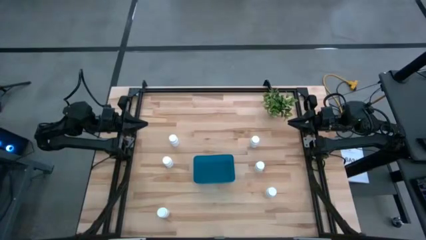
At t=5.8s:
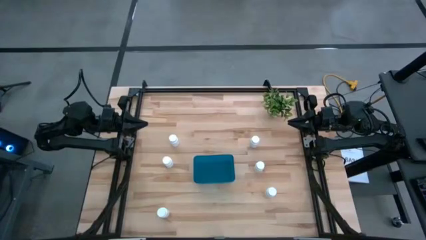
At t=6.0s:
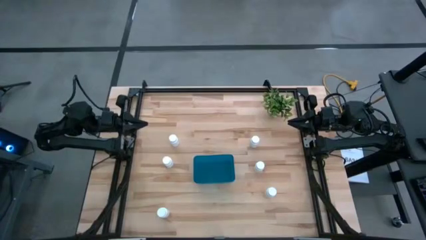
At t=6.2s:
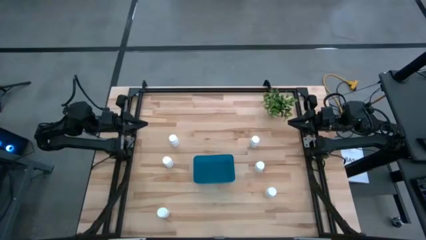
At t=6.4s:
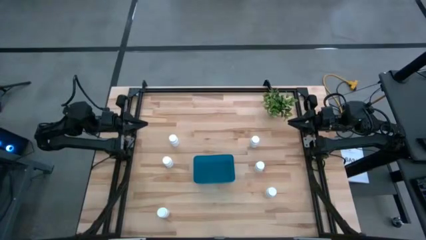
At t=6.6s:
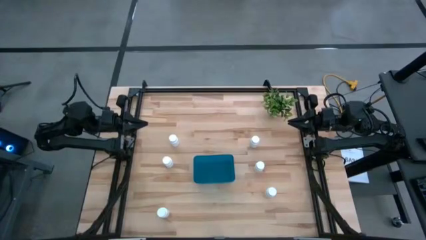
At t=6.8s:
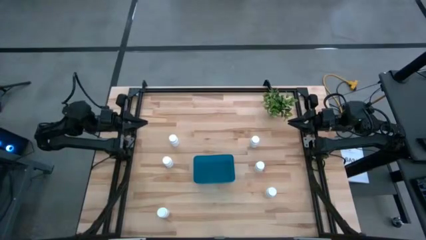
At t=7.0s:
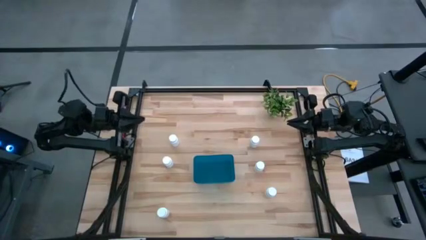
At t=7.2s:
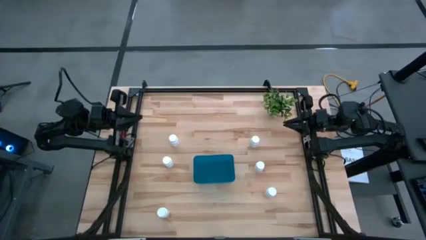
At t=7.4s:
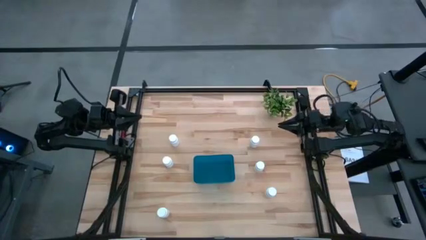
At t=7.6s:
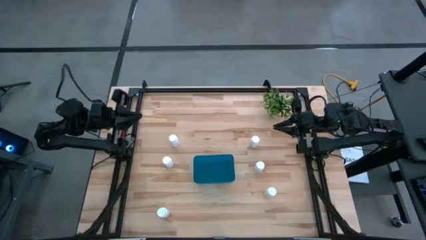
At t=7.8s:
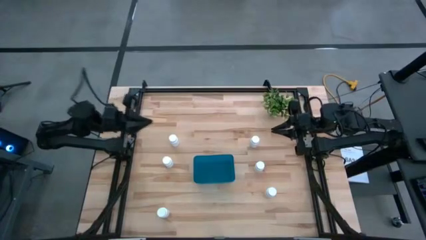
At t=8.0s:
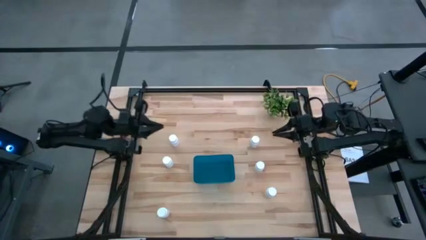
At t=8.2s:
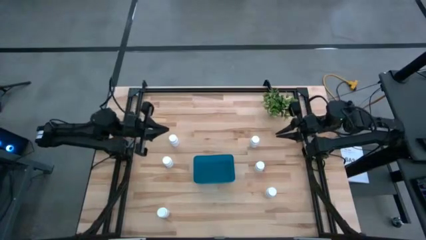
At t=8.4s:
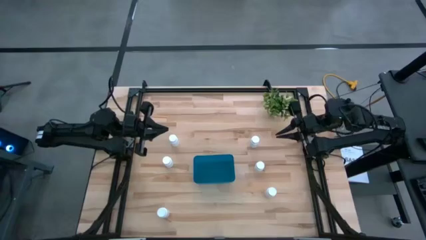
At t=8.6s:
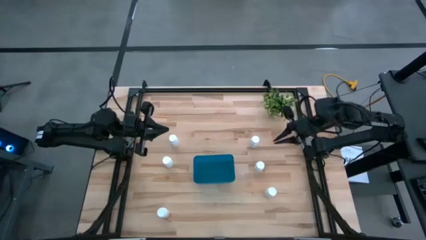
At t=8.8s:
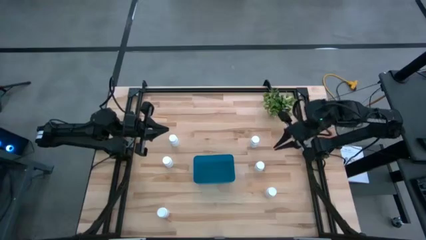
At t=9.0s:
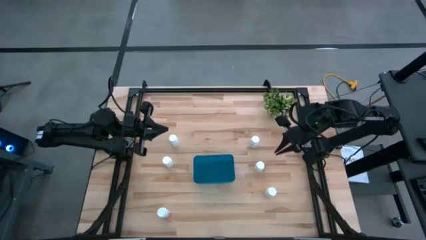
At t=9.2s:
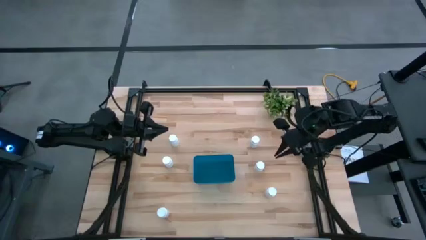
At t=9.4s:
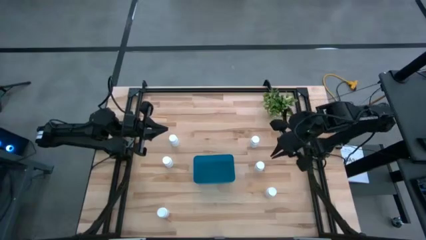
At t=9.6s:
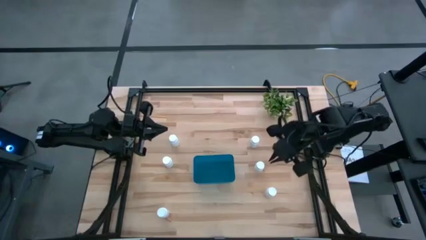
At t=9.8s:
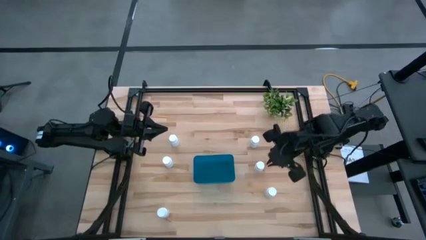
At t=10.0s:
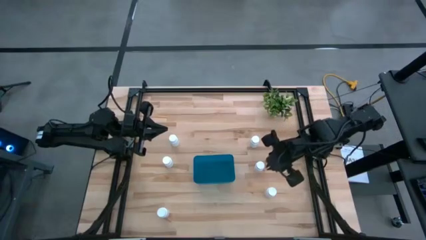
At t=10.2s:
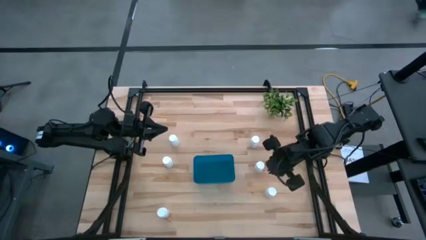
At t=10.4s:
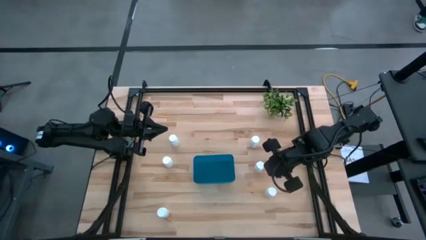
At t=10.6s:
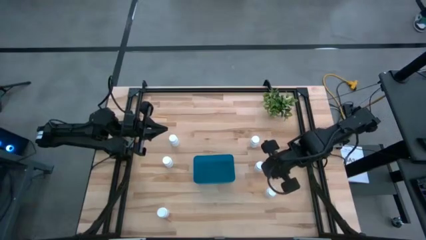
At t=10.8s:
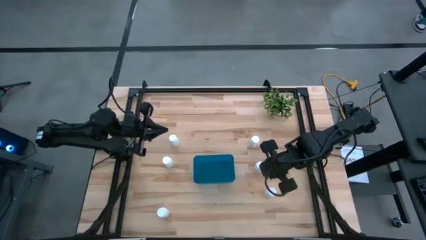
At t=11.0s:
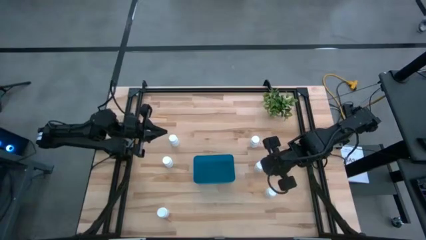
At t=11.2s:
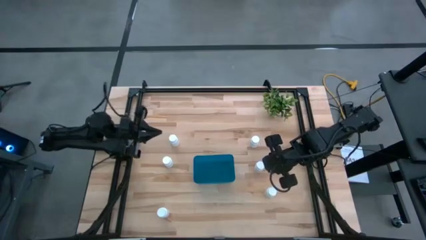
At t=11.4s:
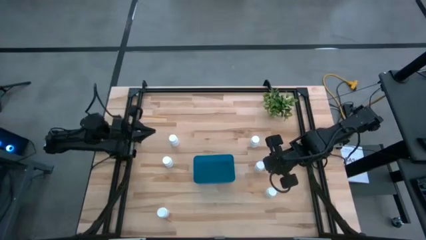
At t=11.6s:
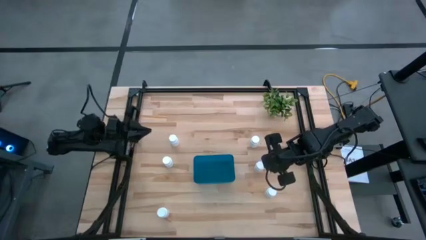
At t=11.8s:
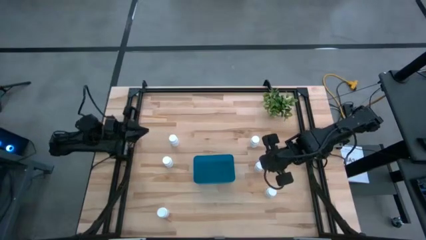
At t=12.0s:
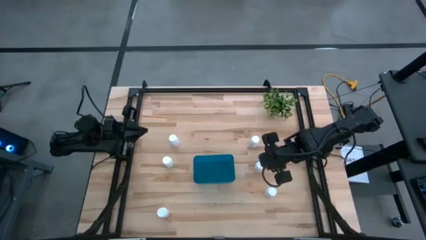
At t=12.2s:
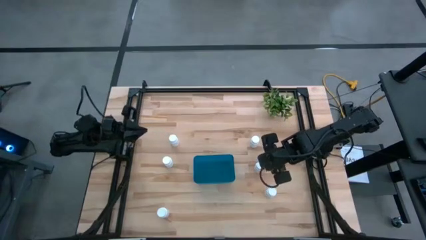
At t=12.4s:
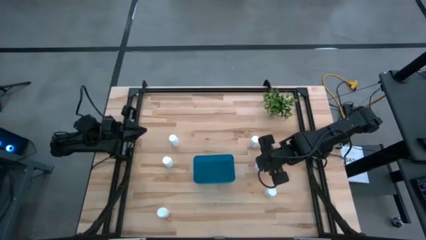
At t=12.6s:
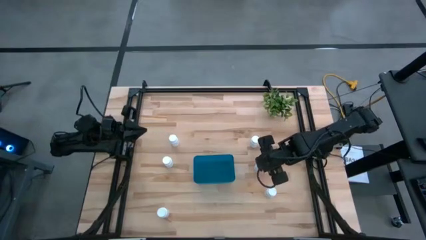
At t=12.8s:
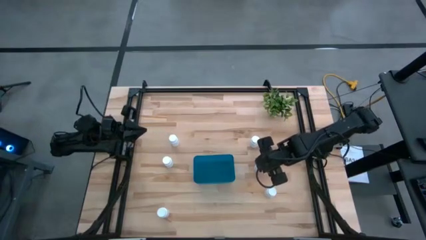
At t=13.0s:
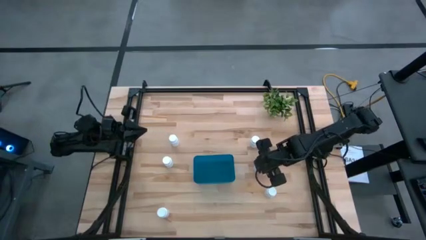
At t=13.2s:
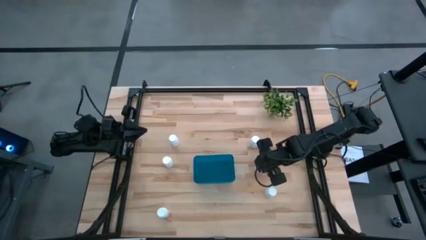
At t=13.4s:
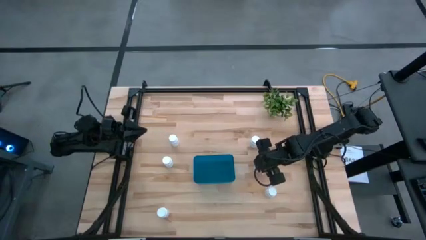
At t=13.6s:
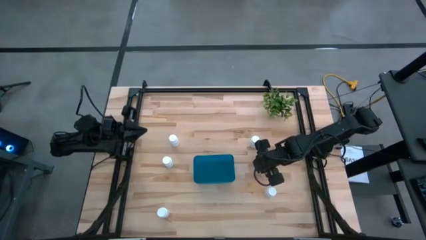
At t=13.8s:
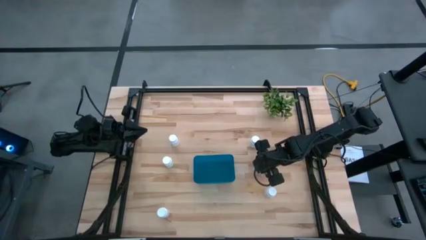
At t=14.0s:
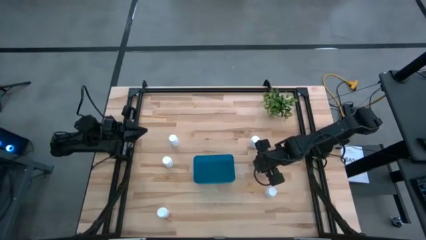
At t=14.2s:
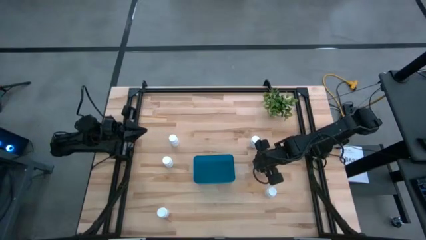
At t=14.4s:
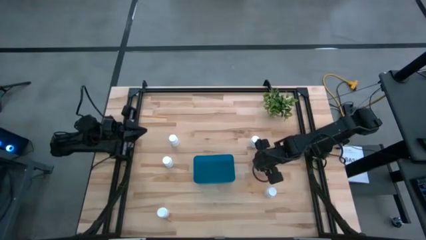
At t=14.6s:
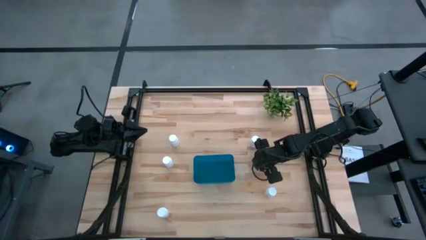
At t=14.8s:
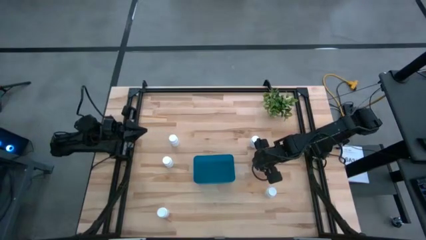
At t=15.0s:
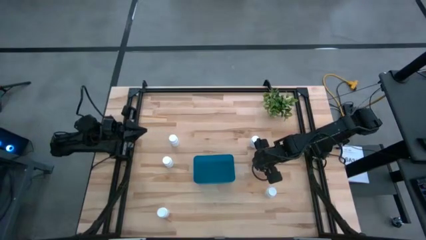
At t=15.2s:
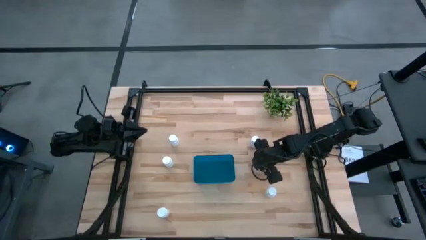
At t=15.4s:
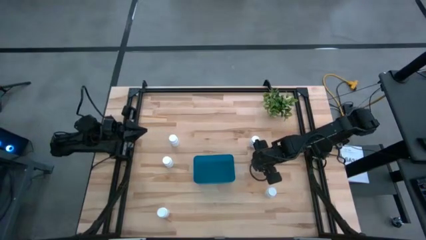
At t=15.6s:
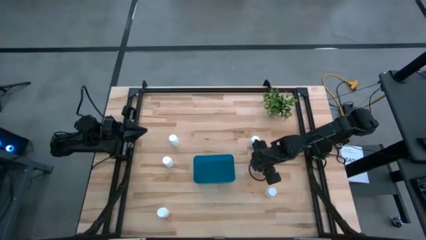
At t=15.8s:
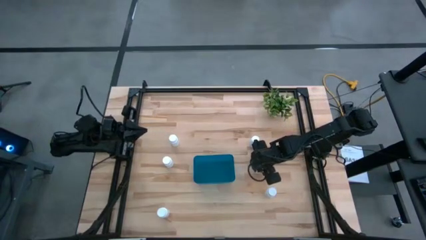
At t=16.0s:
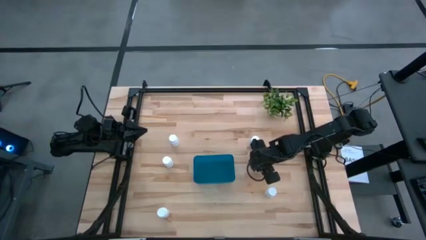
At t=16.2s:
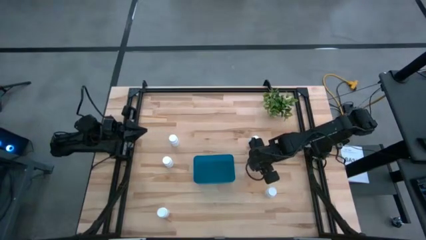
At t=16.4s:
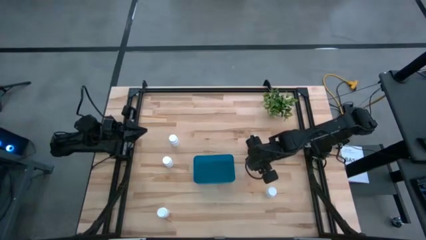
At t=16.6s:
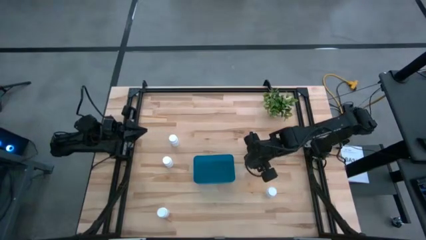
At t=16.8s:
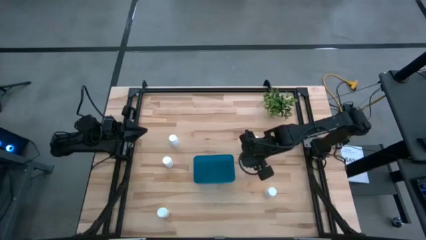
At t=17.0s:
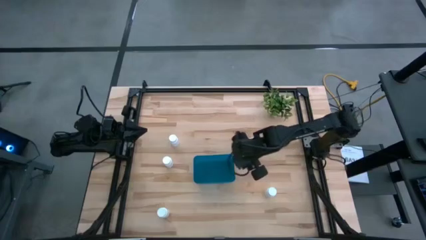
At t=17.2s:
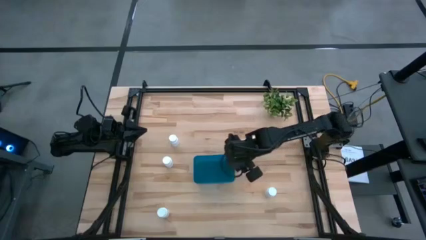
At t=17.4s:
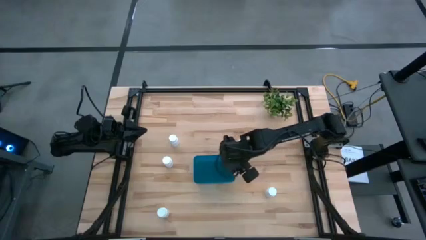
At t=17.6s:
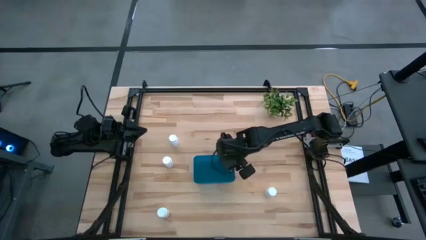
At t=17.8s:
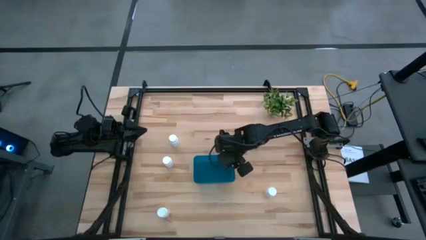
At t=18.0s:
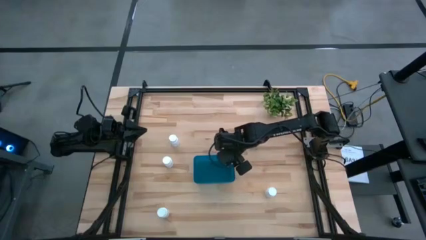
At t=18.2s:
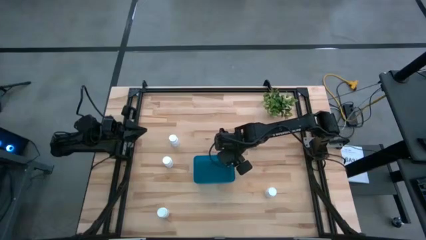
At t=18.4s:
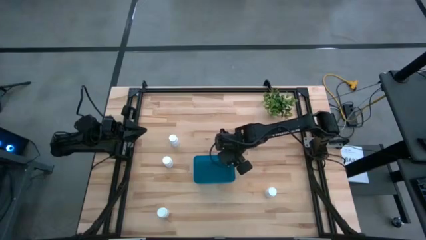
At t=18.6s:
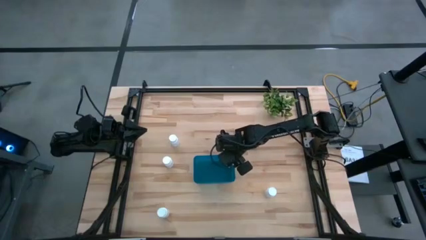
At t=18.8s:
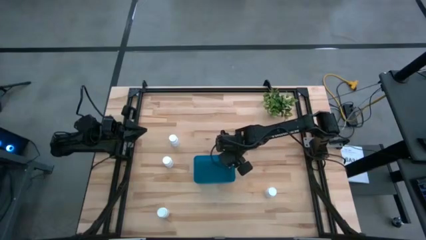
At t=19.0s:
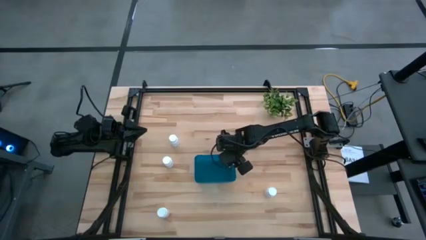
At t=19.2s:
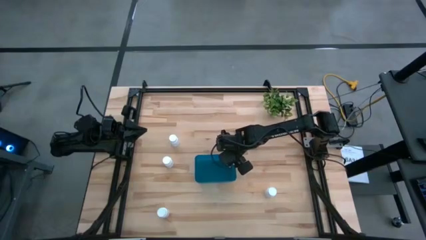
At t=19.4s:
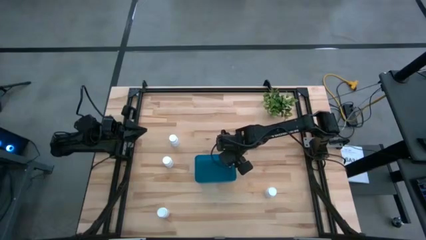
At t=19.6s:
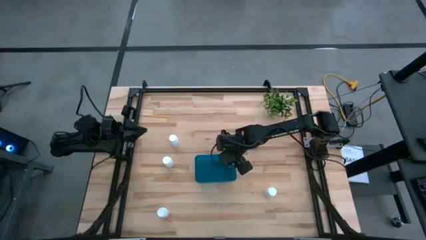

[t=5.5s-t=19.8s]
Task: Pick and place pill bottles into a basket
Put the medicine bottle into the blue bin
